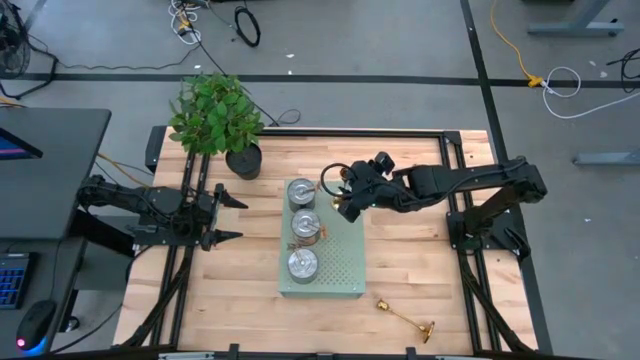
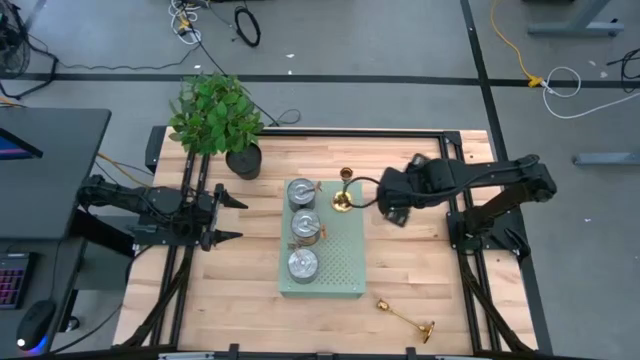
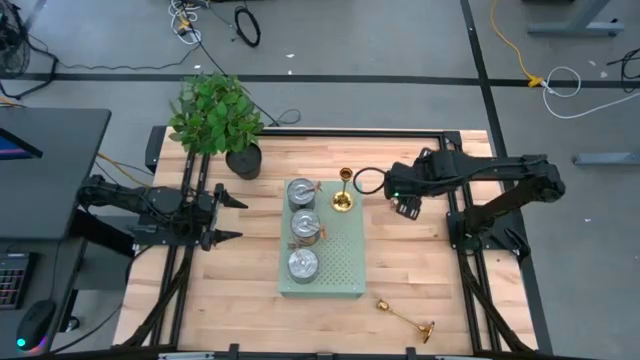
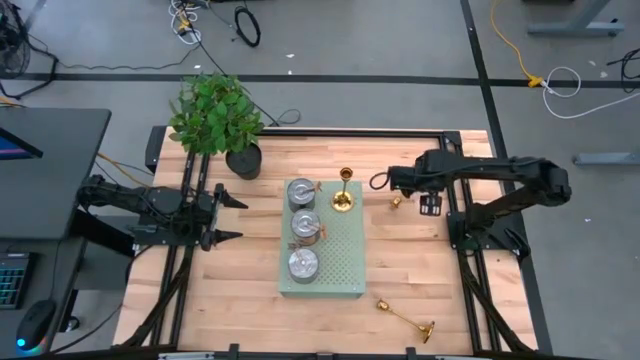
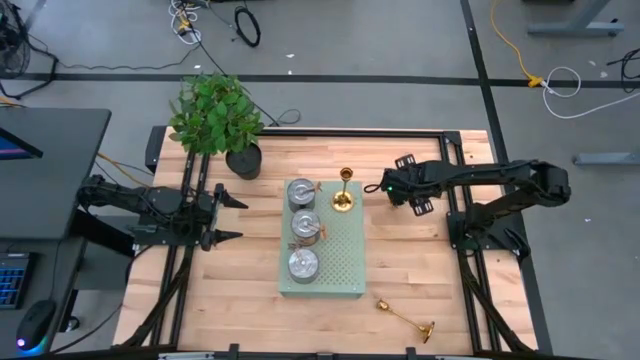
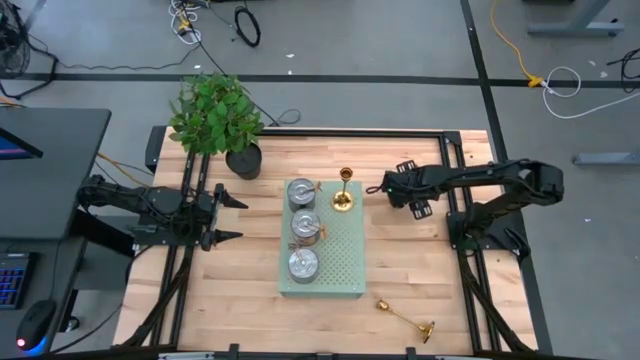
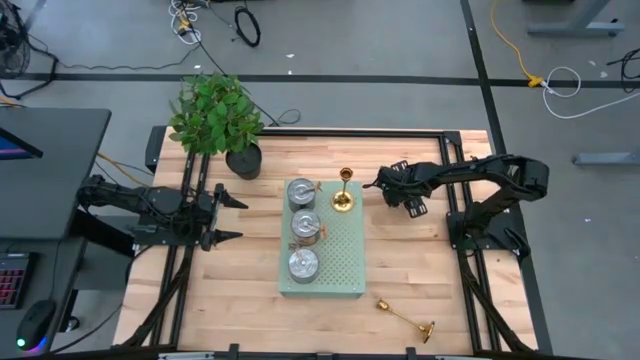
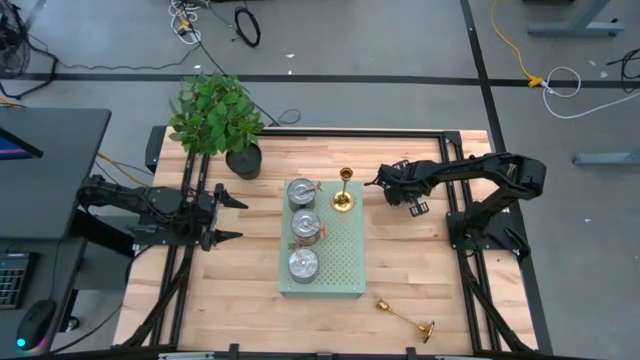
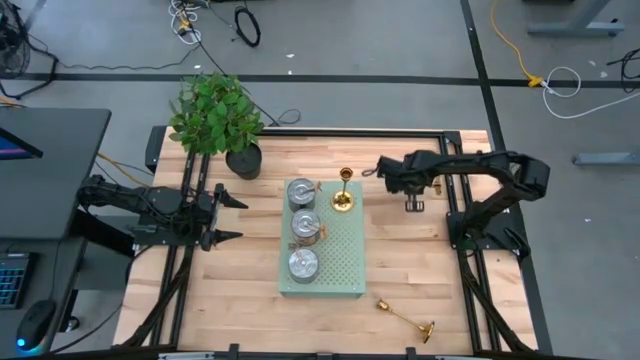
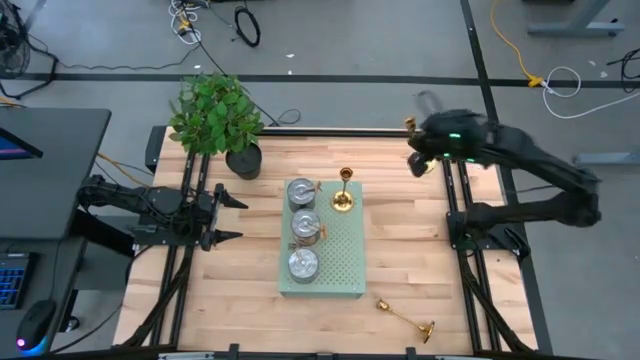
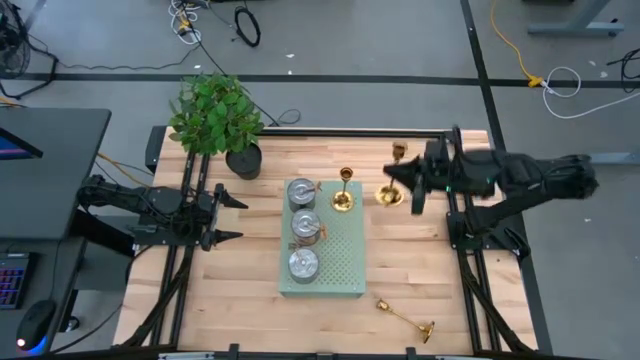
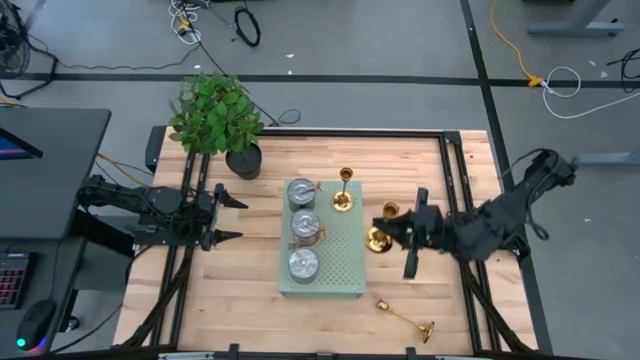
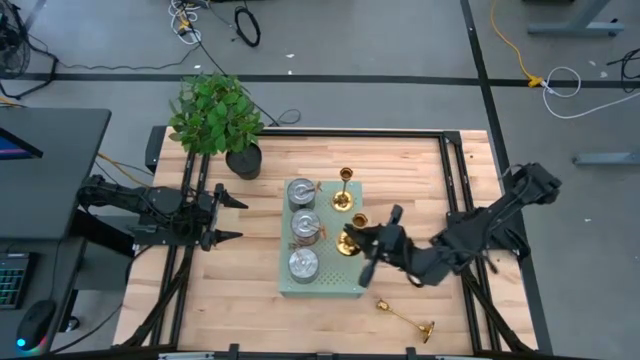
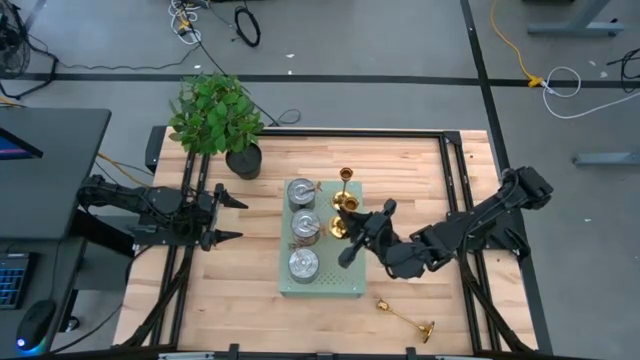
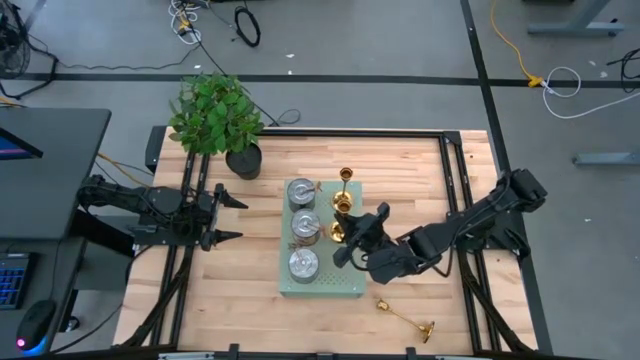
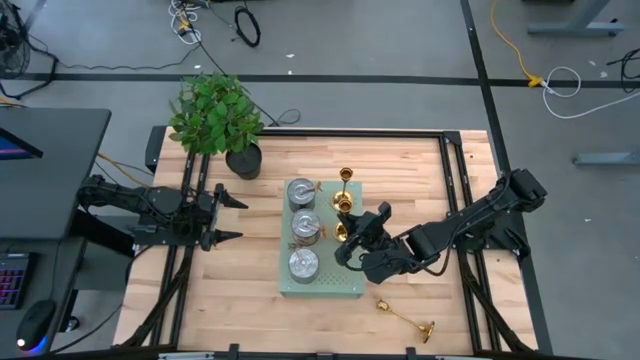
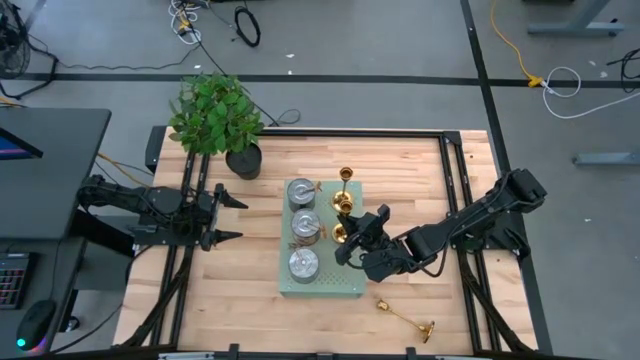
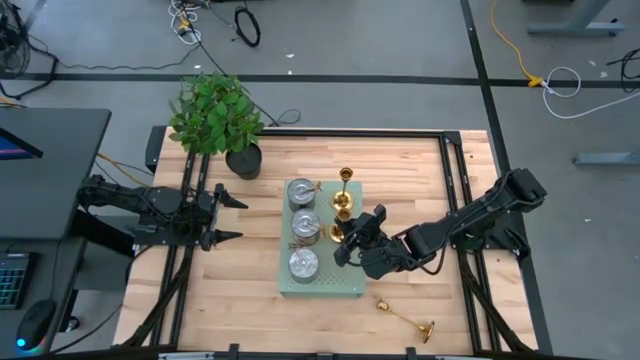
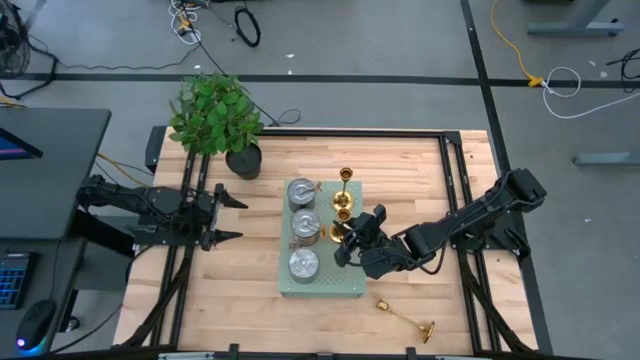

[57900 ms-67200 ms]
Task: Pick & Place candle stick holders
Put the top golden candle holder aligned with the orange scented candle on the shelf

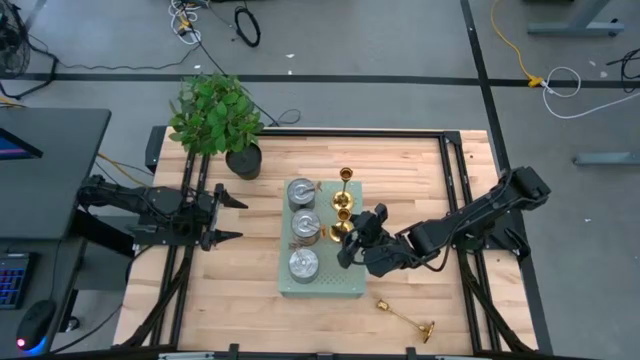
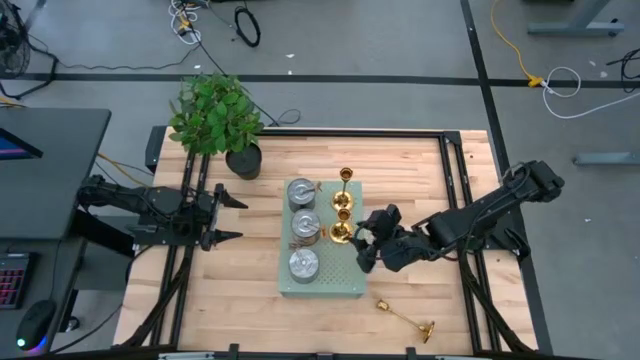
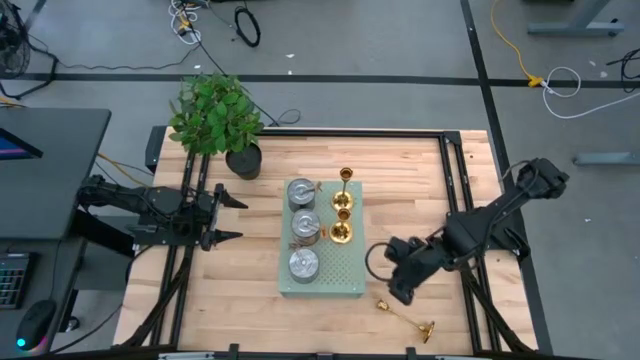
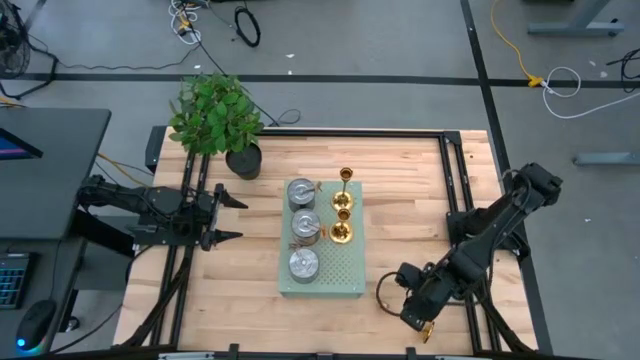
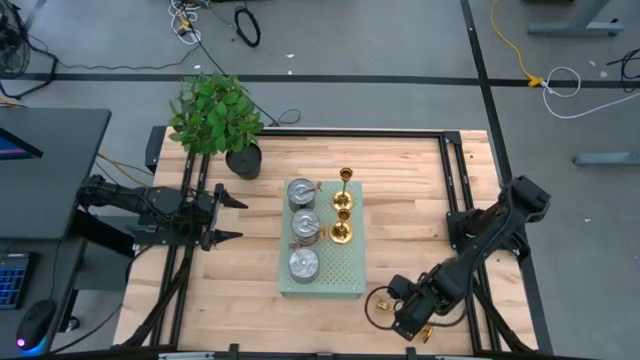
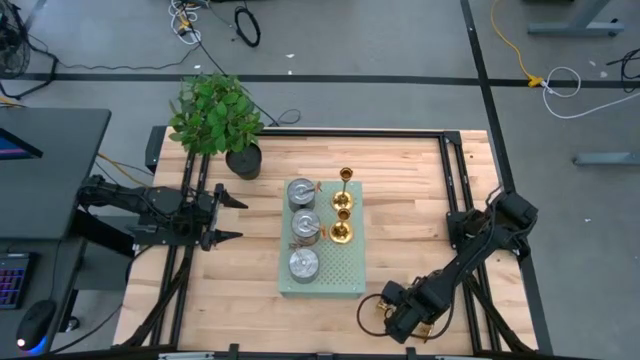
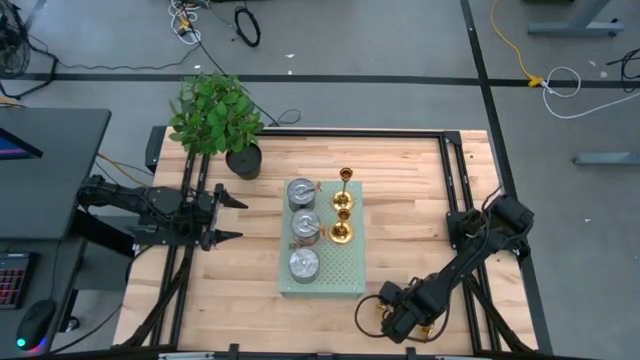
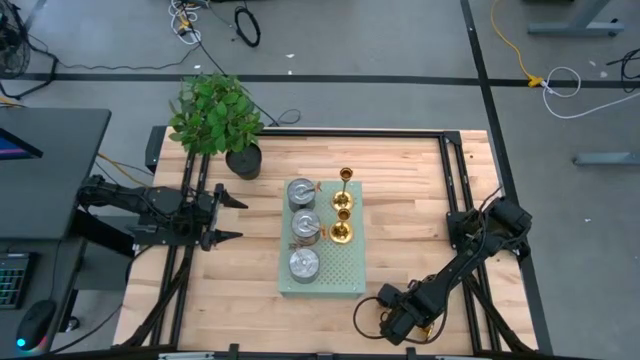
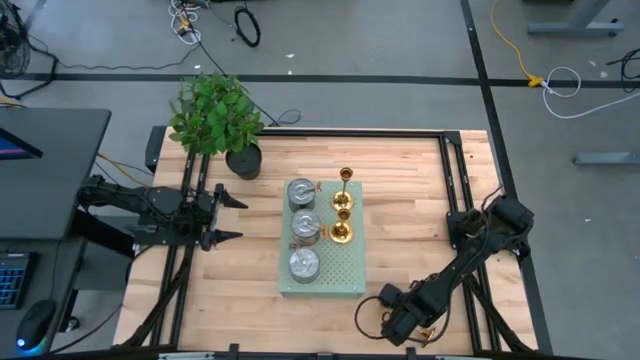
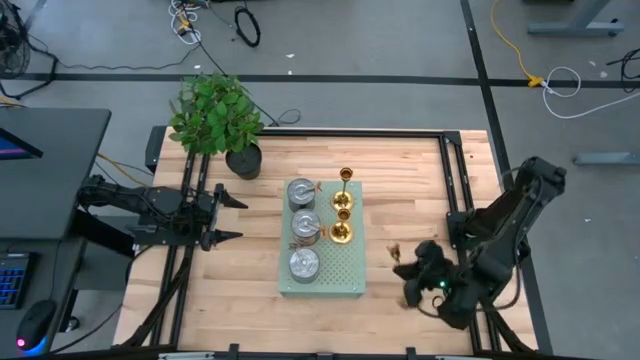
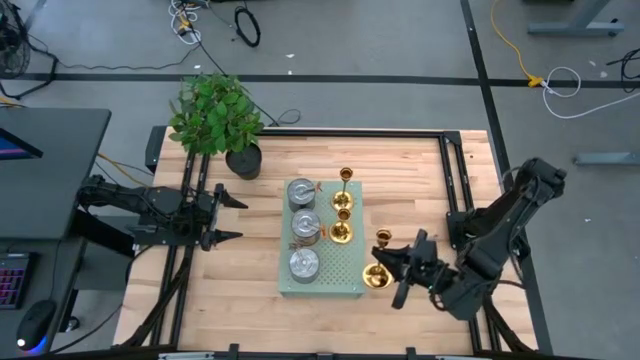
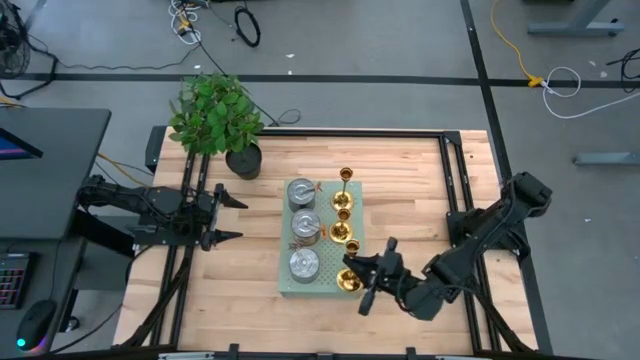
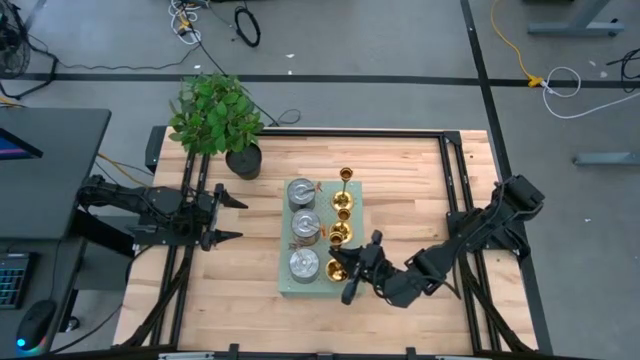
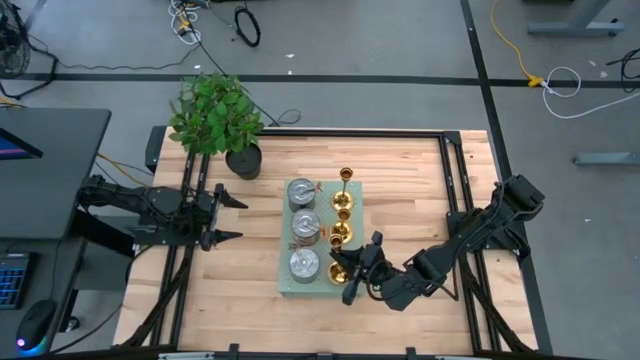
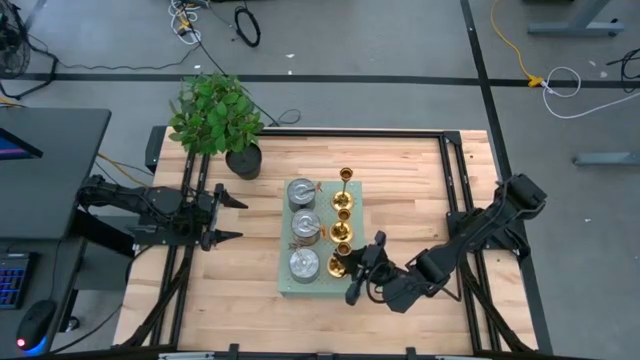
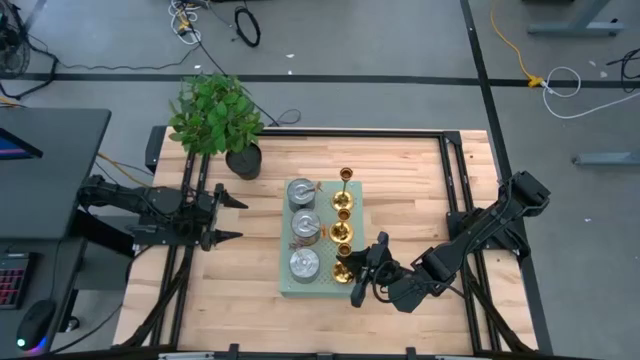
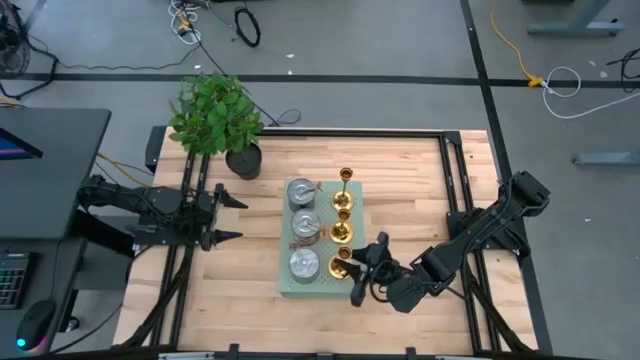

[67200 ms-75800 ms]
Put the golden candle holder aligned with the brown scented candle on the shelf

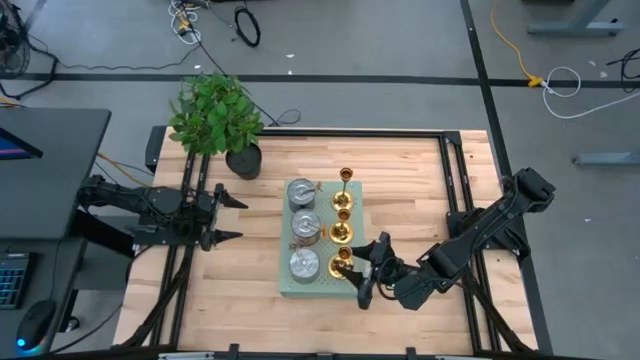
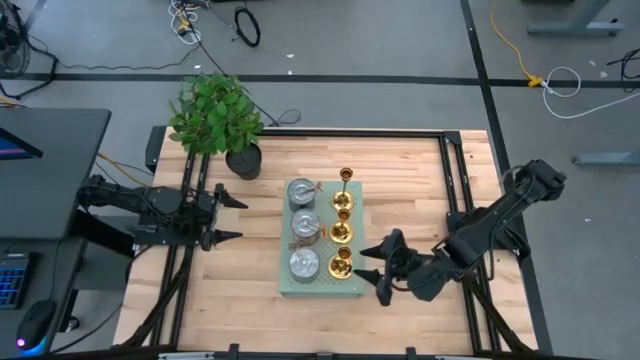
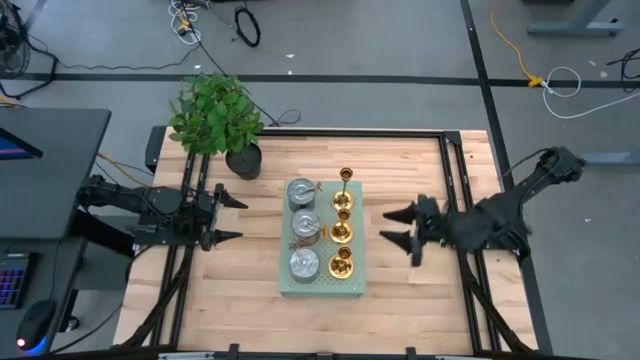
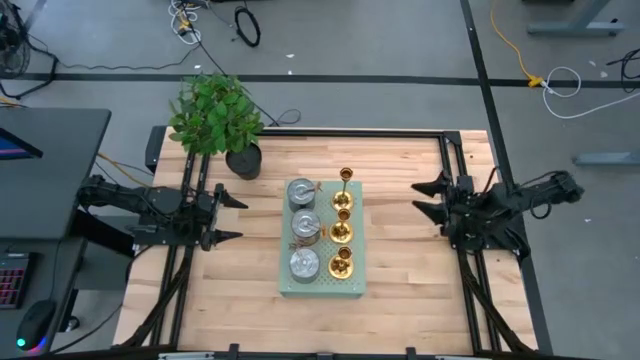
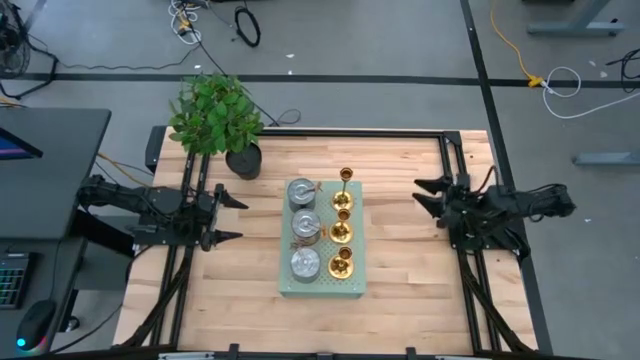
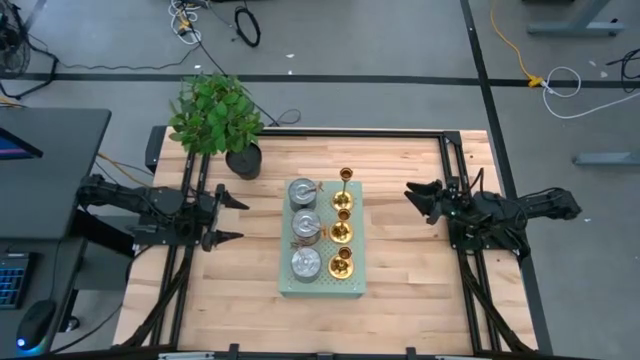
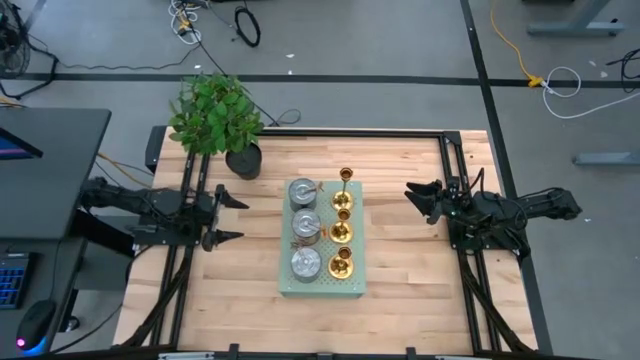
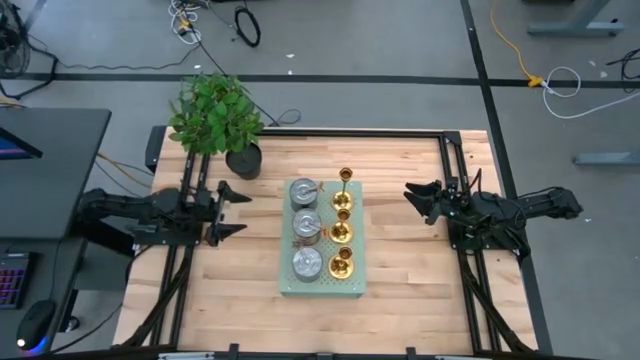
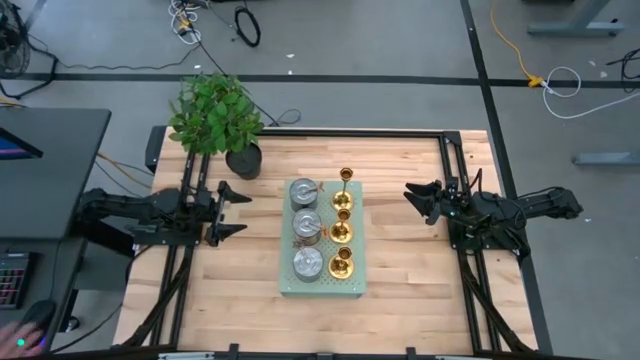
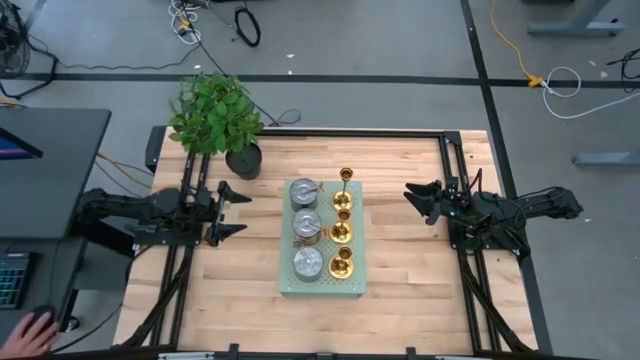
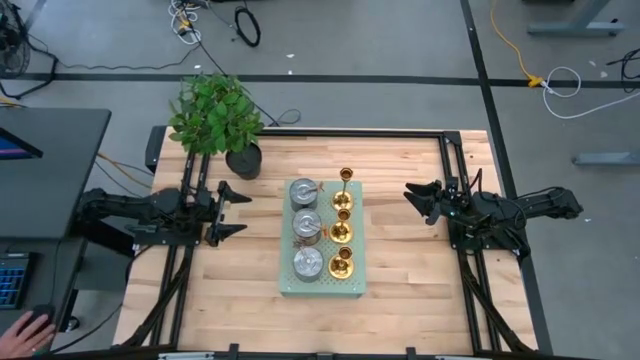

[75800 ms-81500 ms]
Return to Home Position
